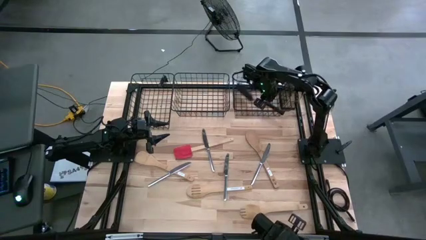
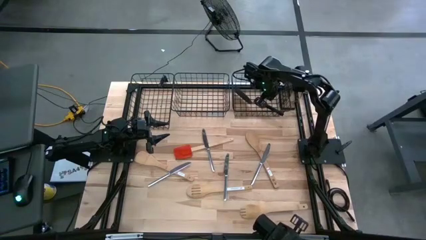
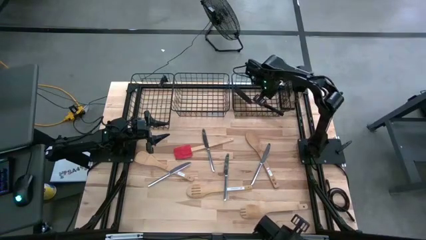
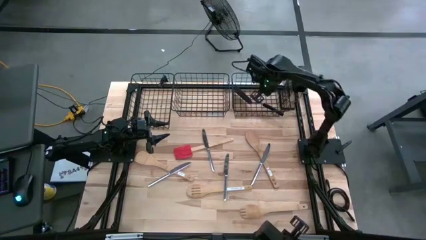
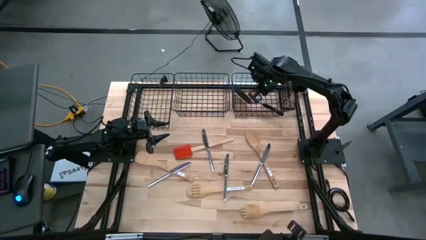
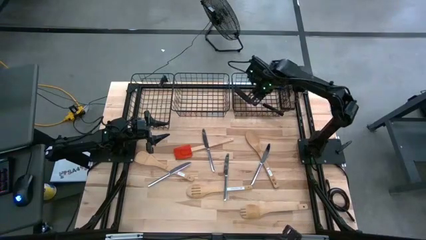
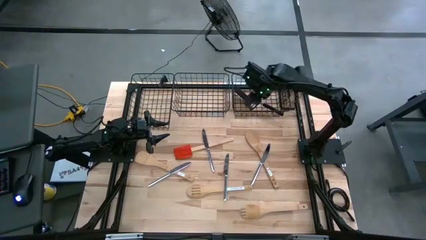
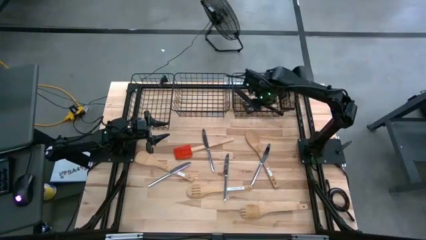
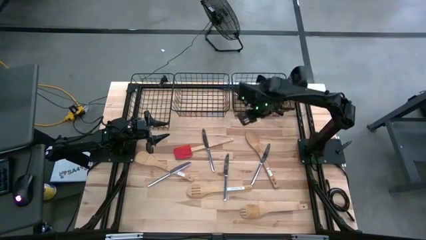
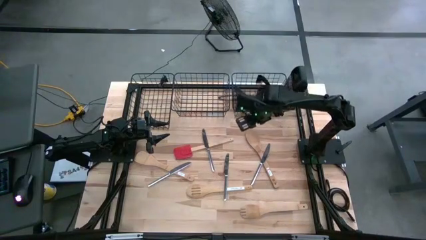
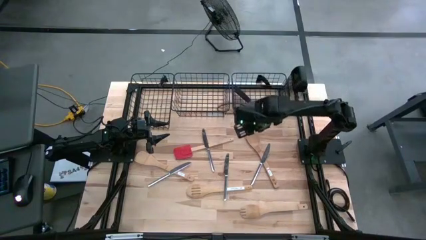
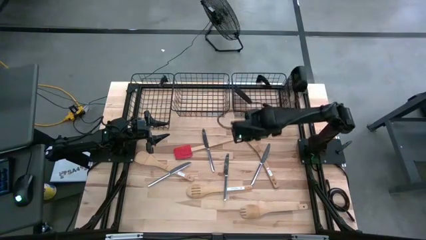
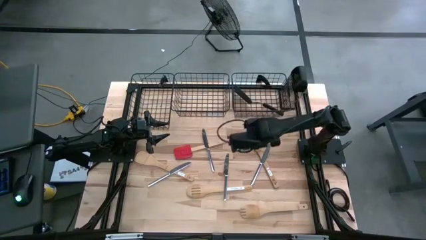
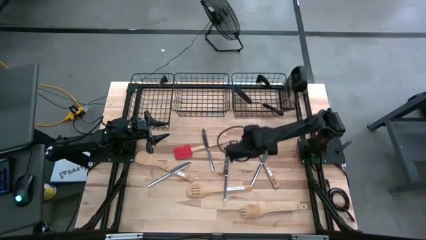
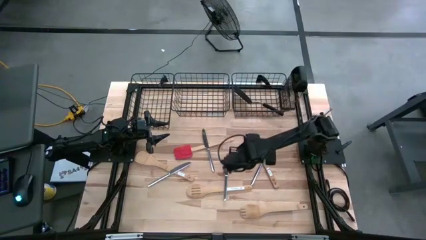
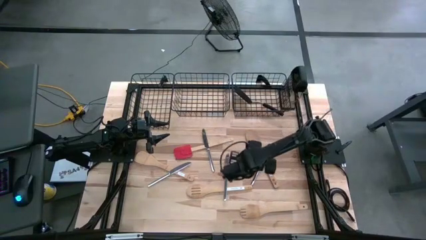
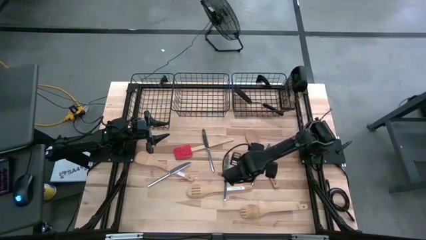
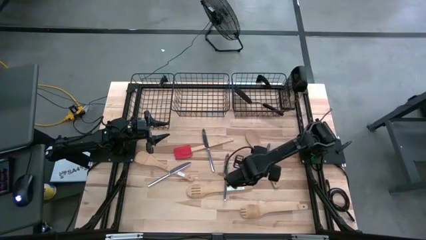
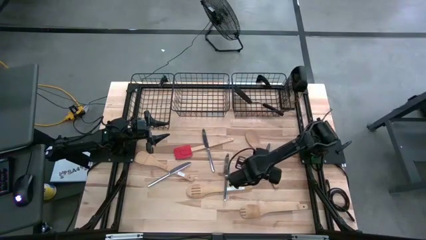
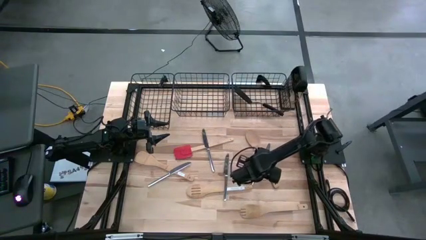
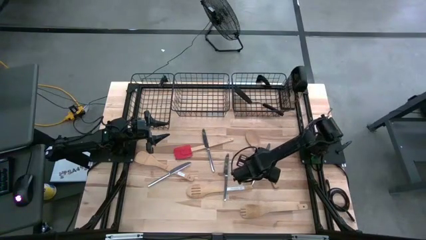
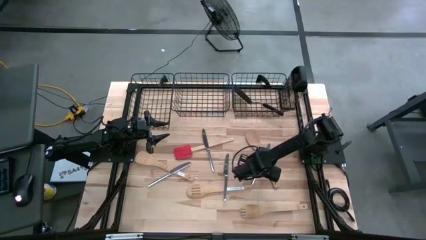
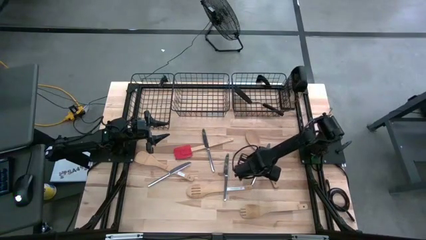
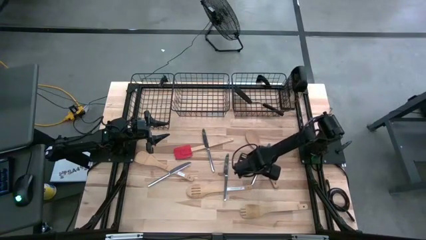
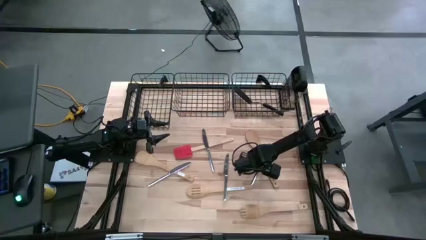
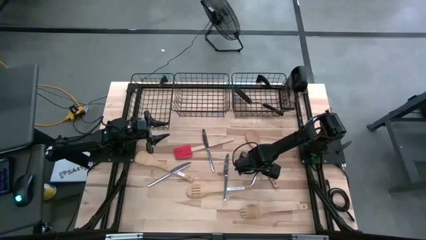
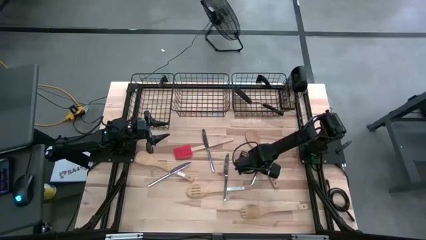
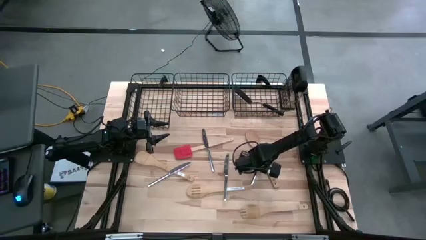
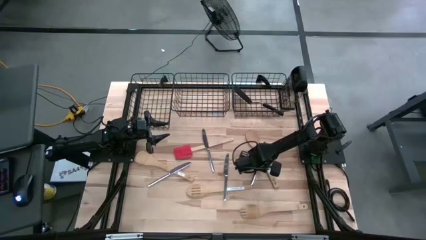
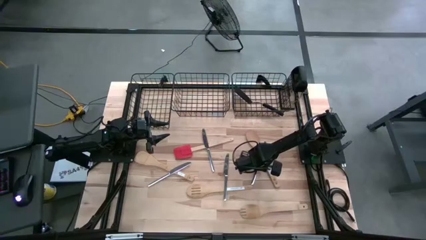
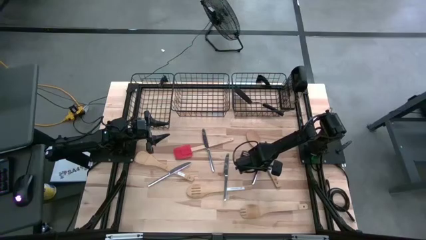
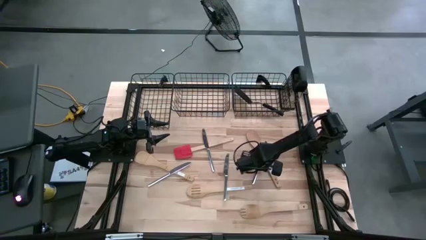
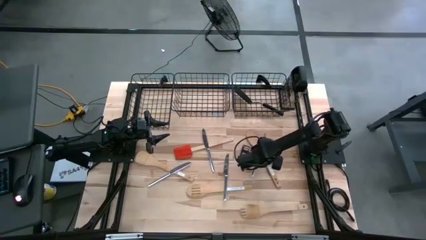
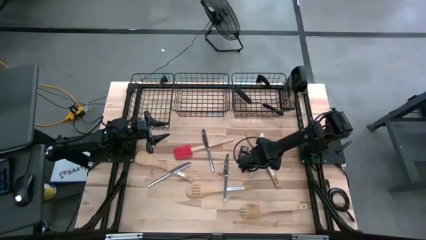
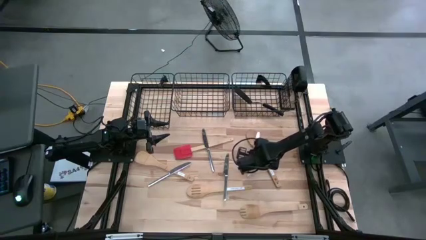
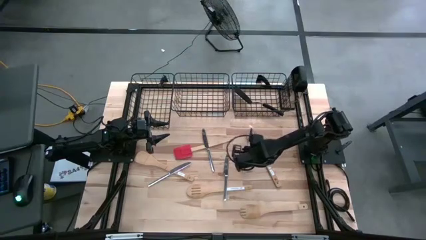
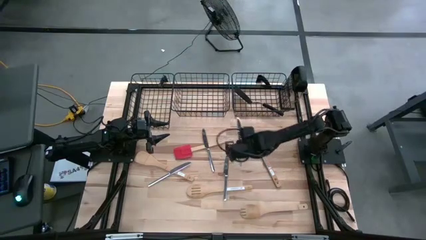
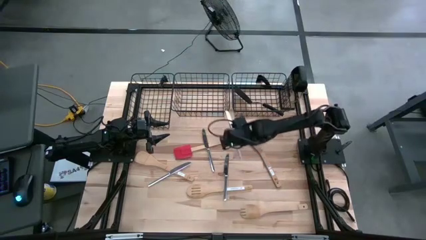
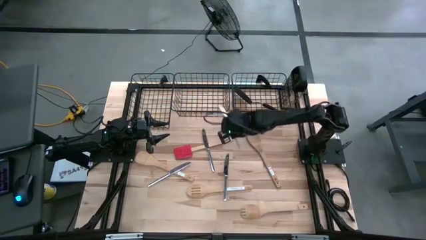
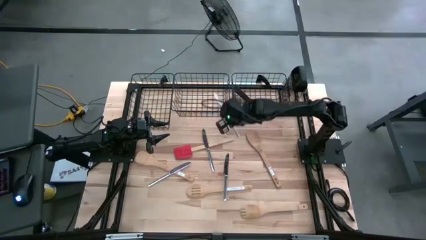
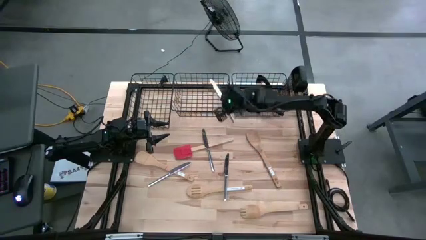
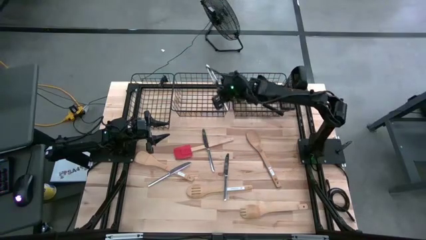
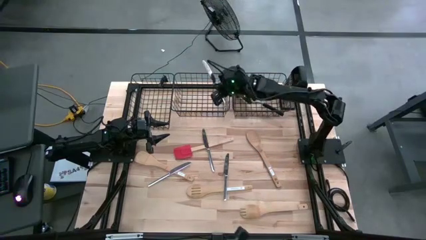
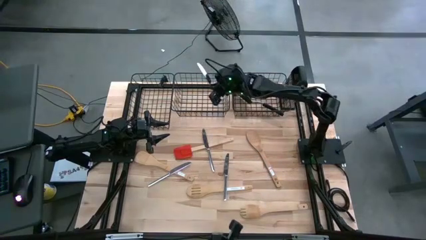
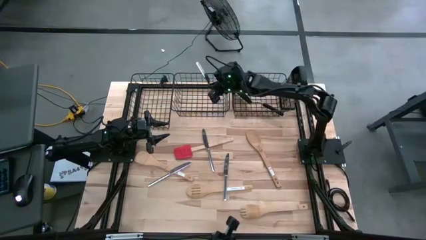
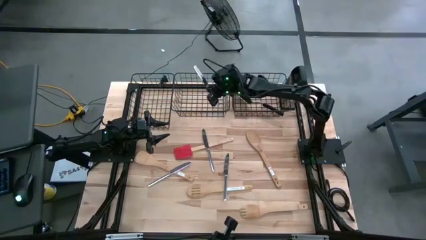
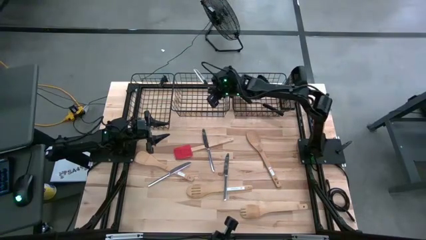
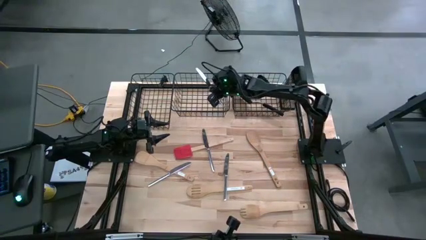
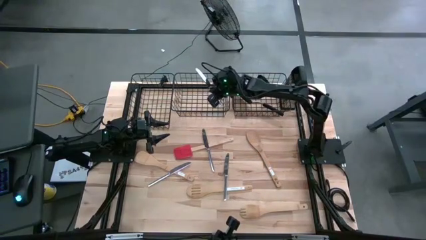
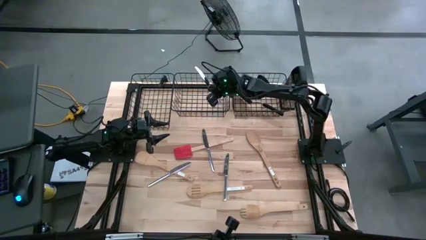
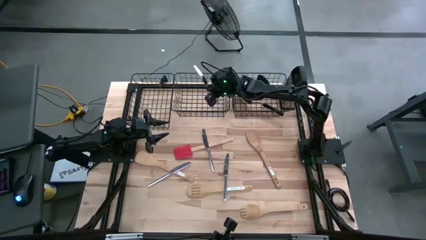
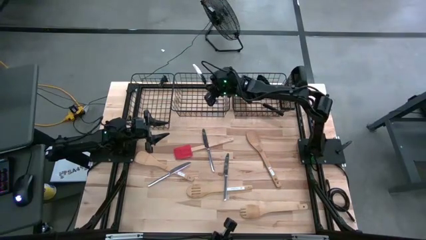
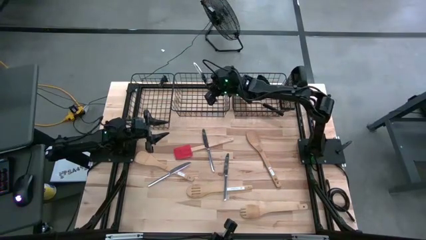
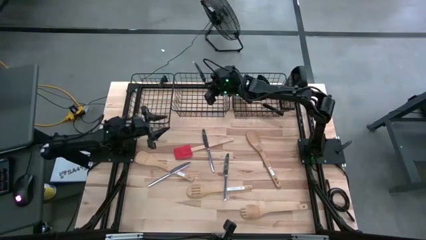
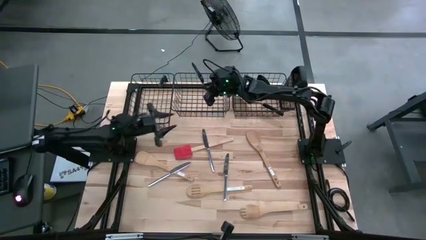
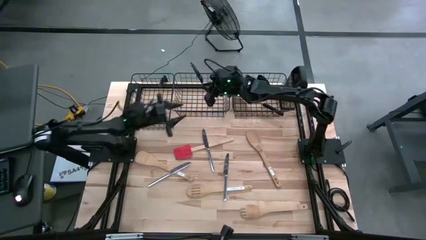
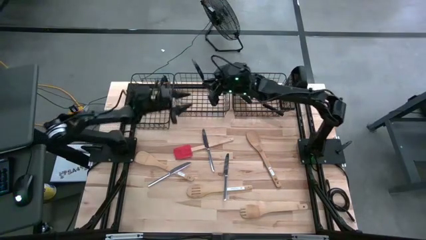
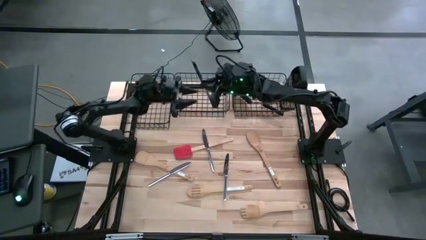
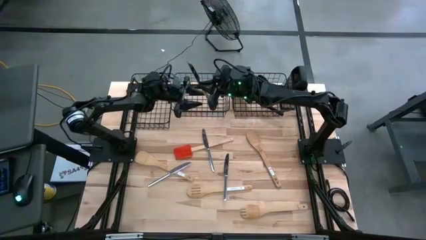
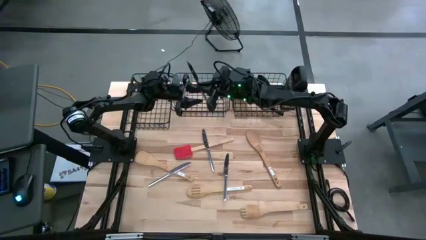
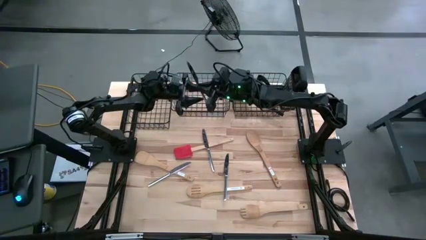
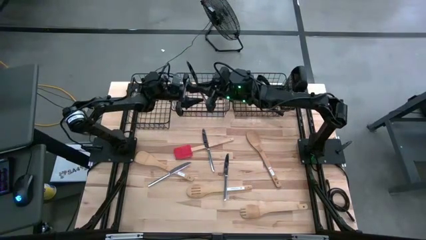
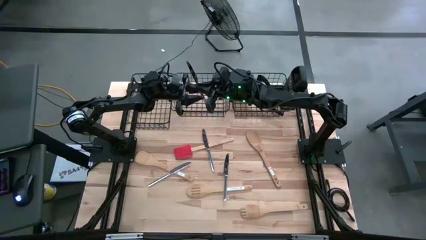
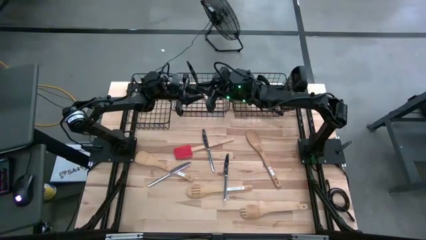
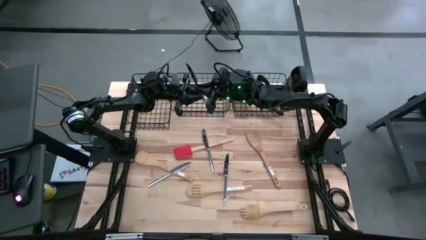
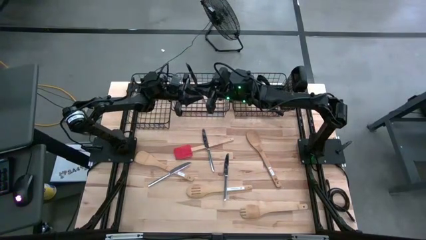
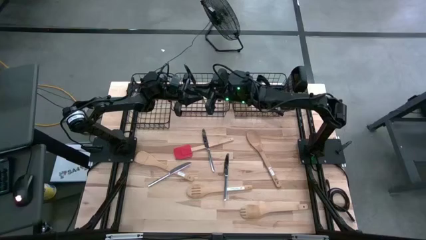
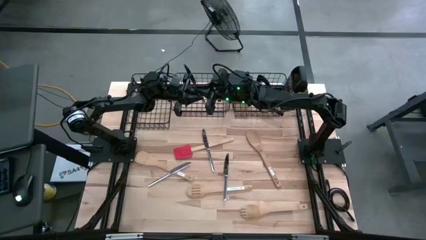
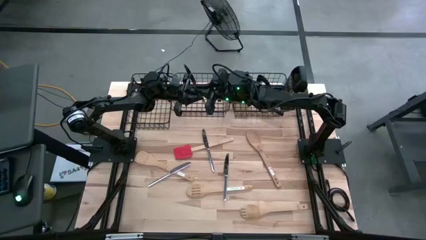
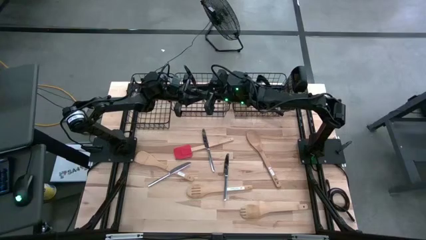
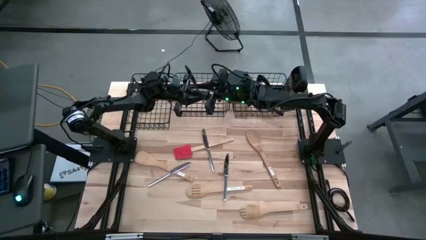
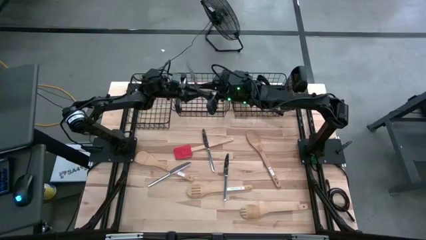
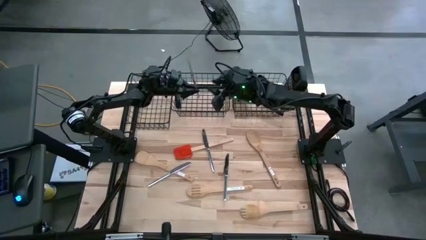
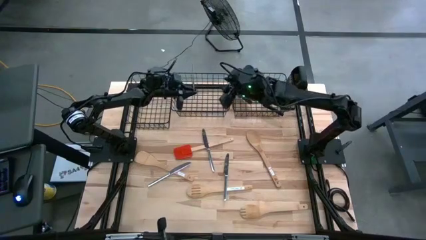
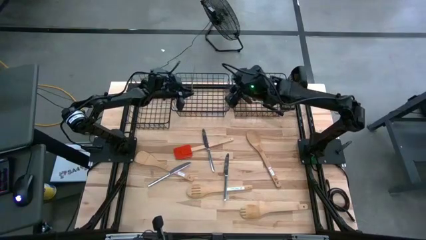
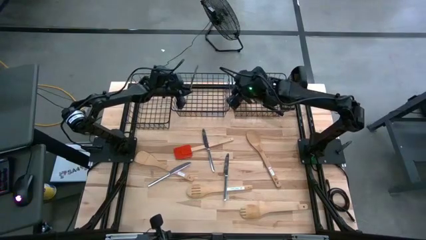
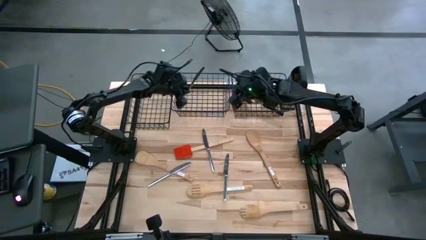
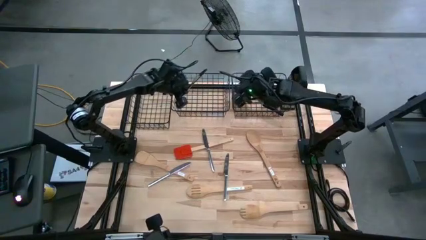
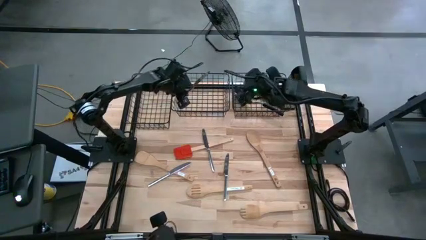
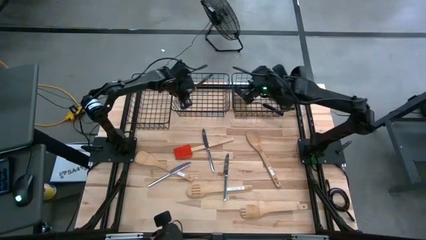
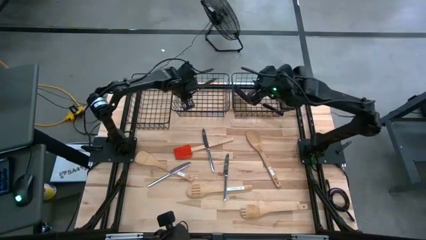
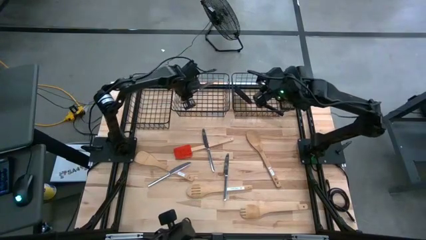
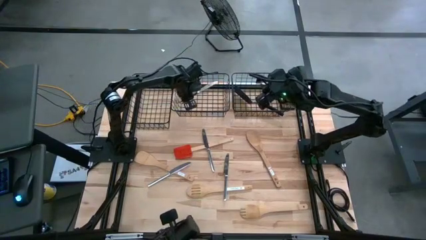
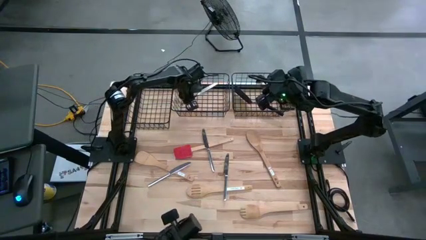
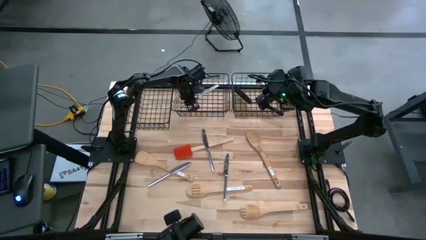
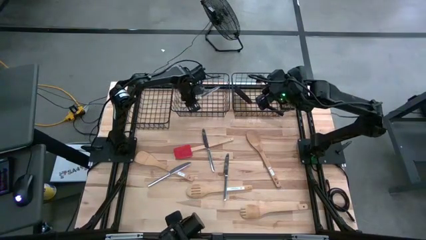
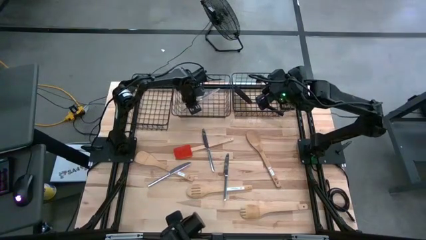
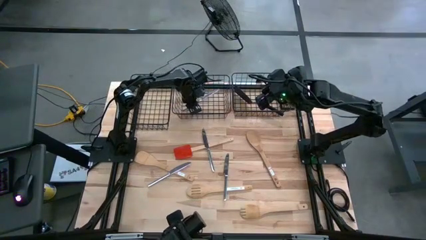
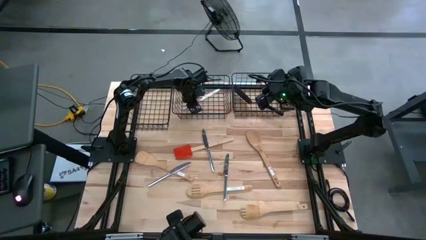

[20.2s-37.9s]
Task: Pick & Place Kitchen Items
Put the table knife into the middle wire basket
